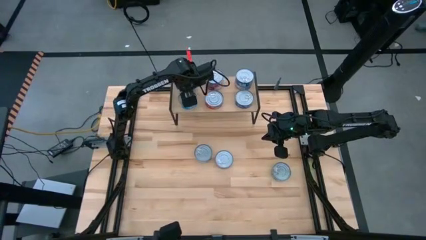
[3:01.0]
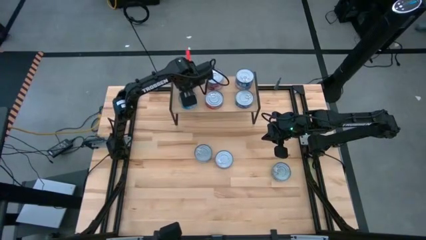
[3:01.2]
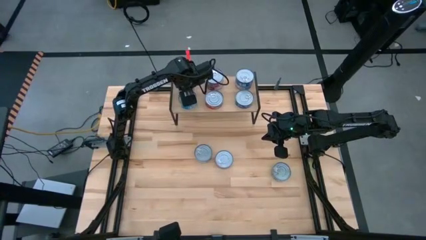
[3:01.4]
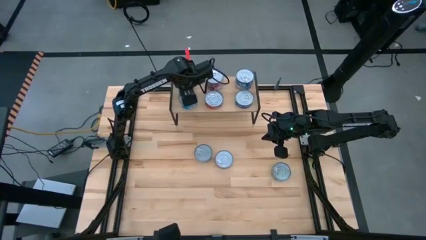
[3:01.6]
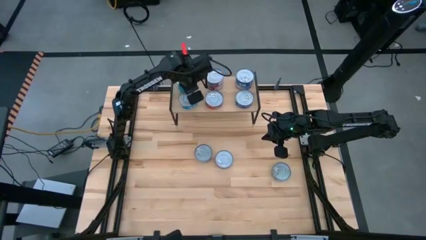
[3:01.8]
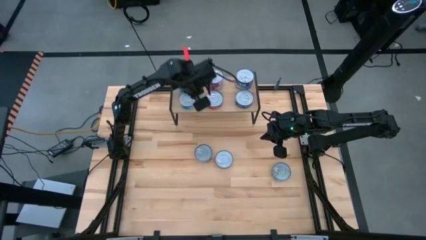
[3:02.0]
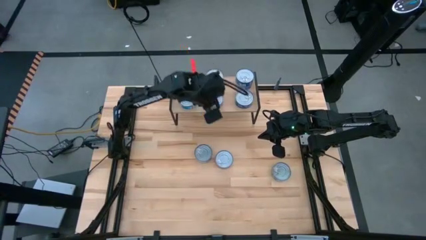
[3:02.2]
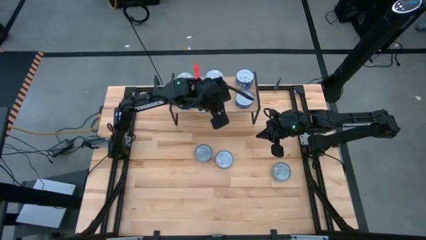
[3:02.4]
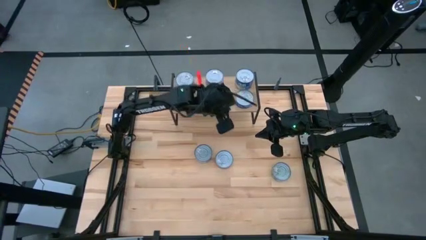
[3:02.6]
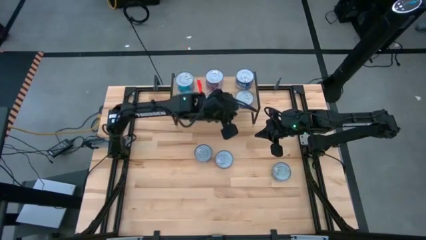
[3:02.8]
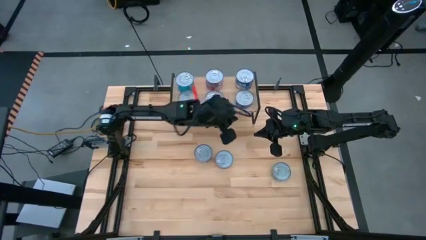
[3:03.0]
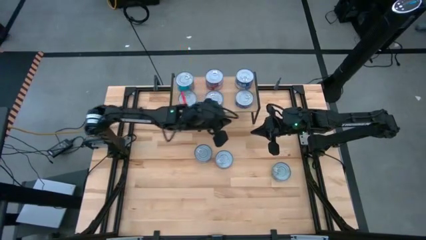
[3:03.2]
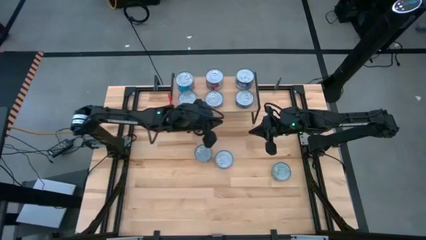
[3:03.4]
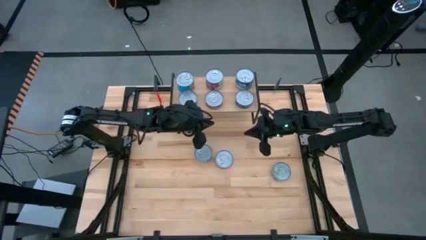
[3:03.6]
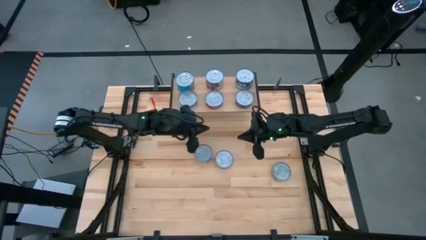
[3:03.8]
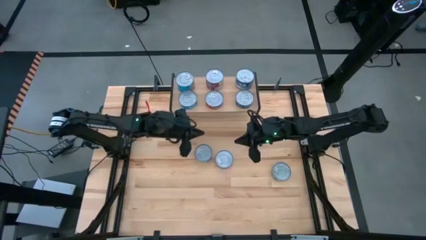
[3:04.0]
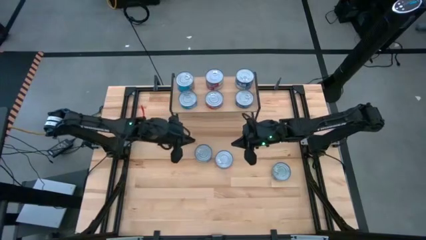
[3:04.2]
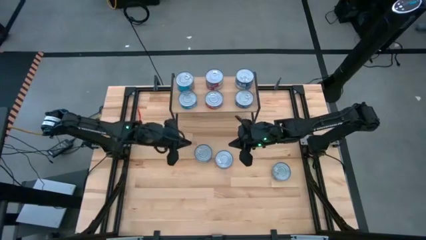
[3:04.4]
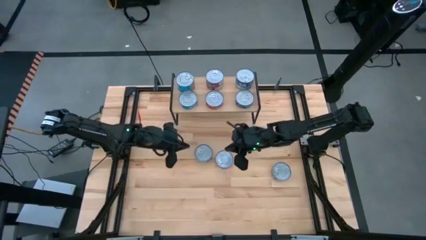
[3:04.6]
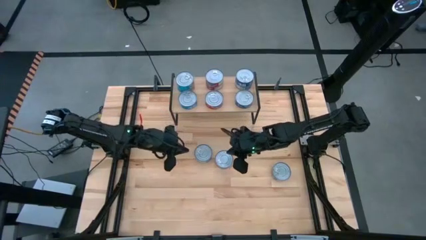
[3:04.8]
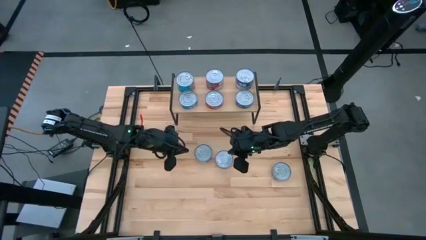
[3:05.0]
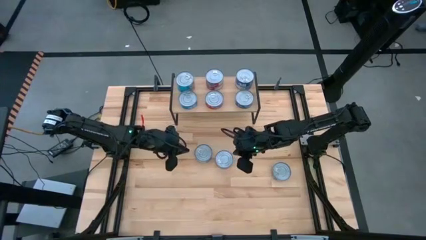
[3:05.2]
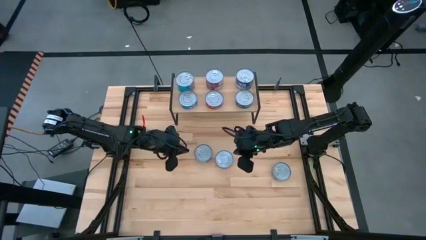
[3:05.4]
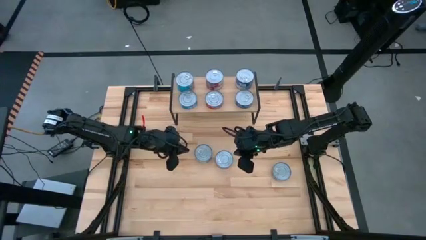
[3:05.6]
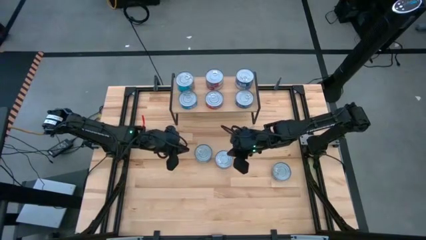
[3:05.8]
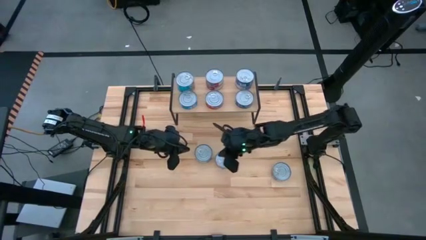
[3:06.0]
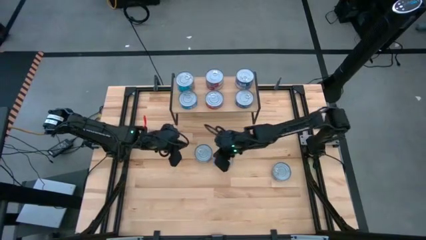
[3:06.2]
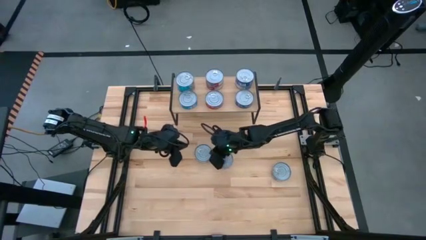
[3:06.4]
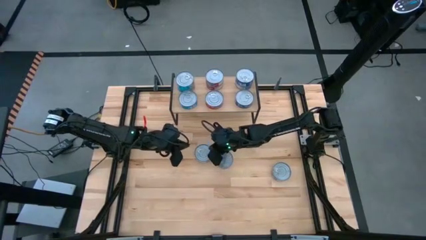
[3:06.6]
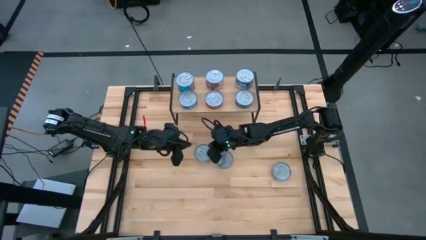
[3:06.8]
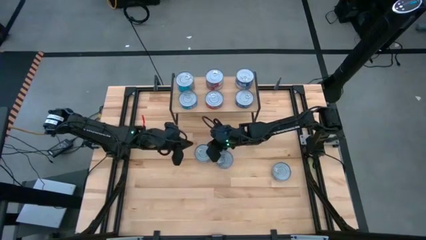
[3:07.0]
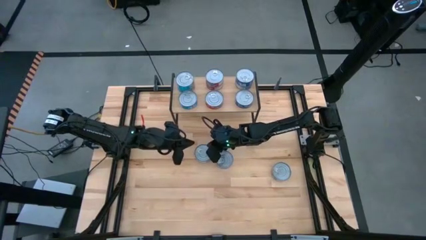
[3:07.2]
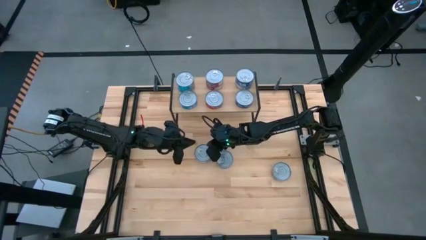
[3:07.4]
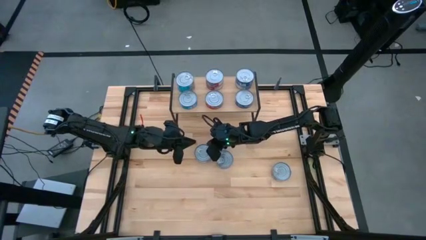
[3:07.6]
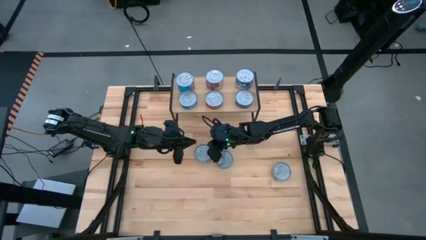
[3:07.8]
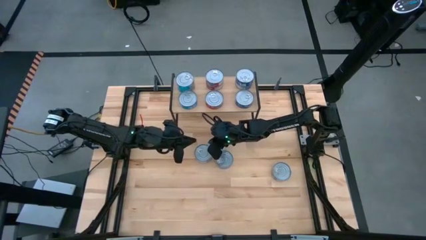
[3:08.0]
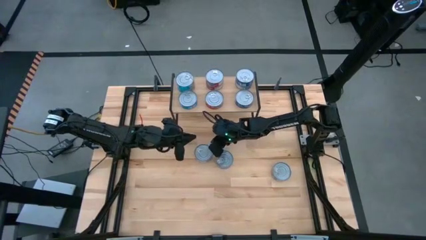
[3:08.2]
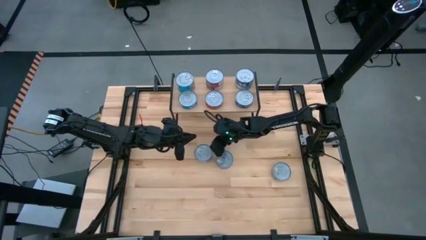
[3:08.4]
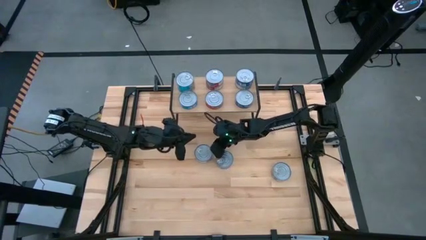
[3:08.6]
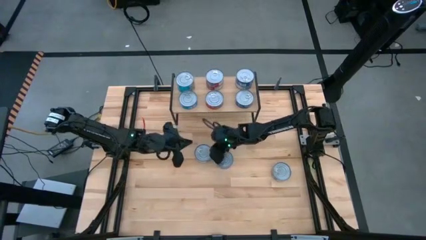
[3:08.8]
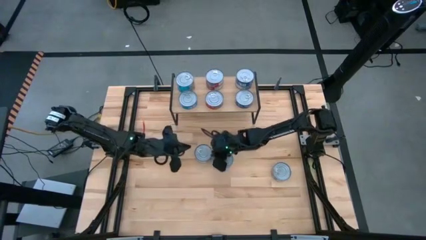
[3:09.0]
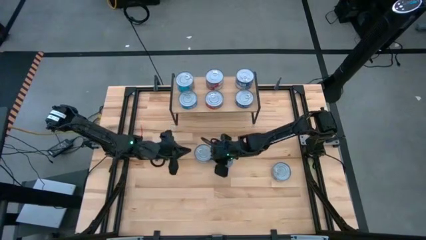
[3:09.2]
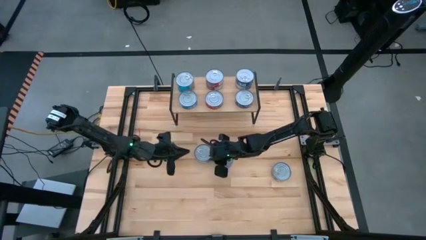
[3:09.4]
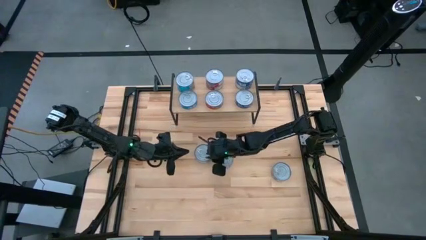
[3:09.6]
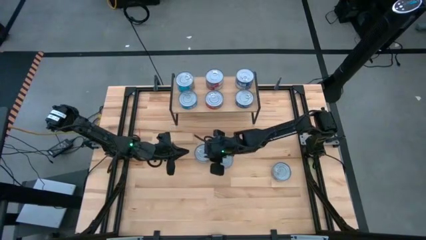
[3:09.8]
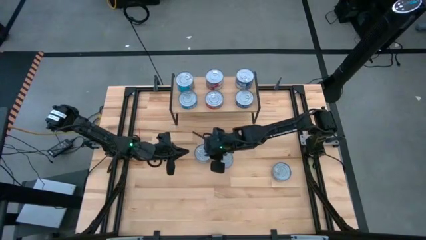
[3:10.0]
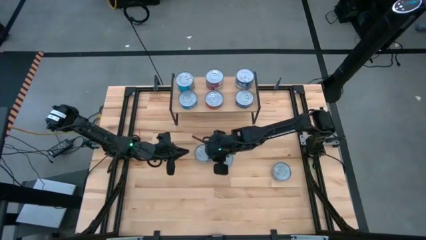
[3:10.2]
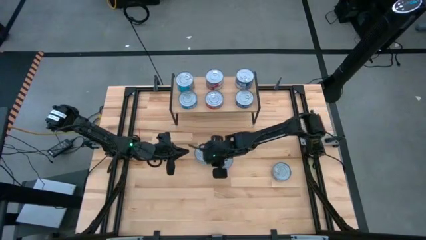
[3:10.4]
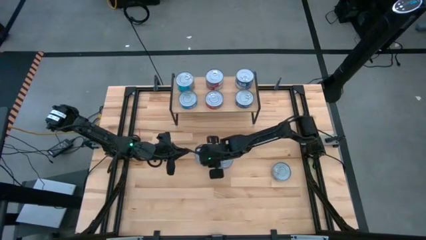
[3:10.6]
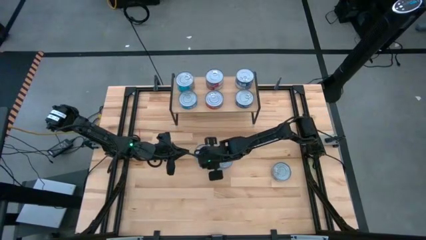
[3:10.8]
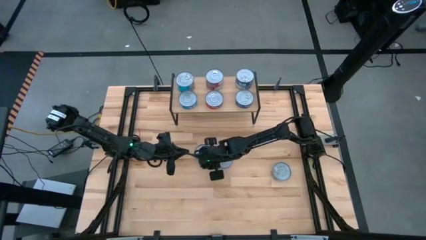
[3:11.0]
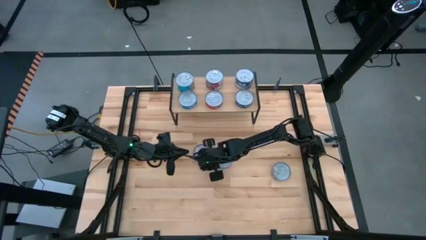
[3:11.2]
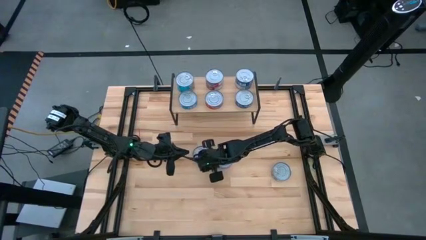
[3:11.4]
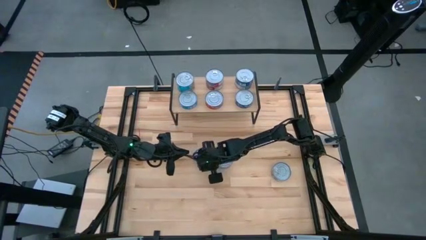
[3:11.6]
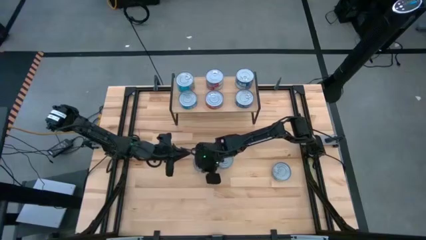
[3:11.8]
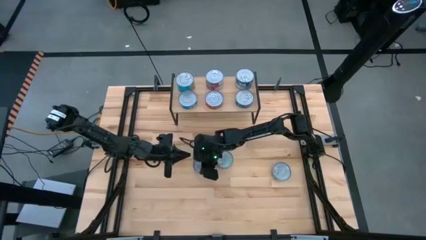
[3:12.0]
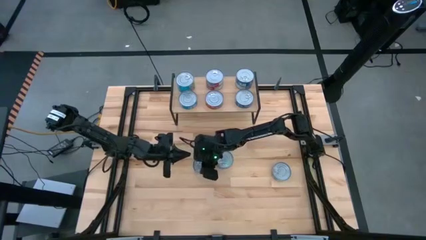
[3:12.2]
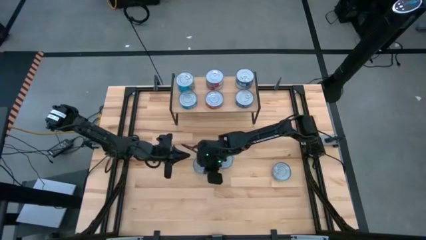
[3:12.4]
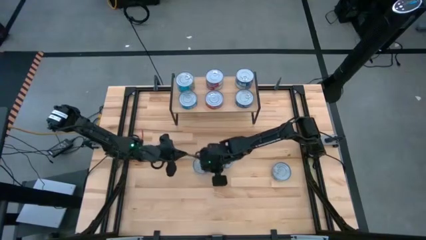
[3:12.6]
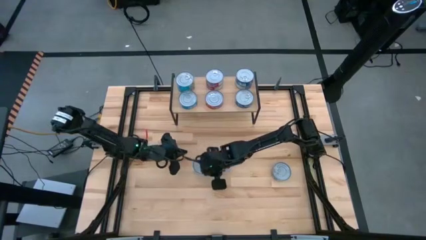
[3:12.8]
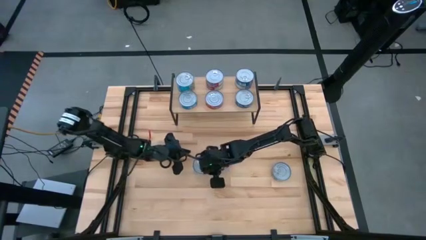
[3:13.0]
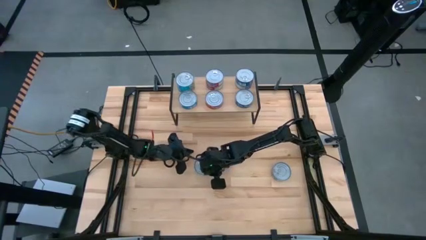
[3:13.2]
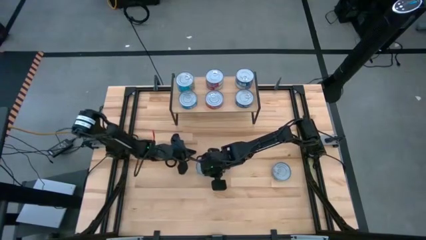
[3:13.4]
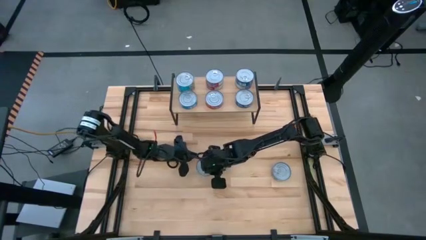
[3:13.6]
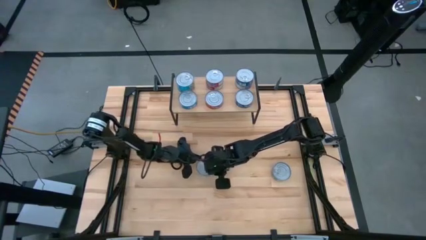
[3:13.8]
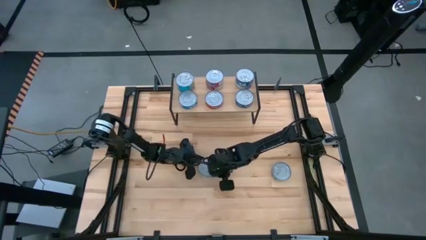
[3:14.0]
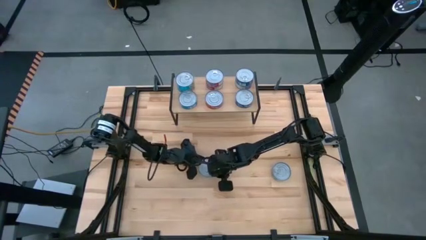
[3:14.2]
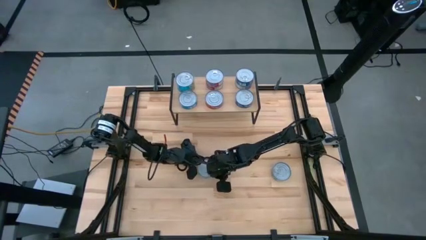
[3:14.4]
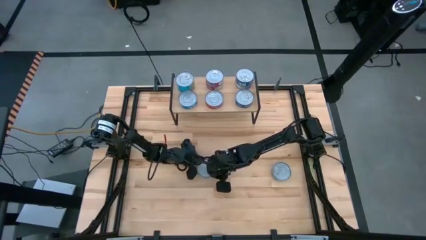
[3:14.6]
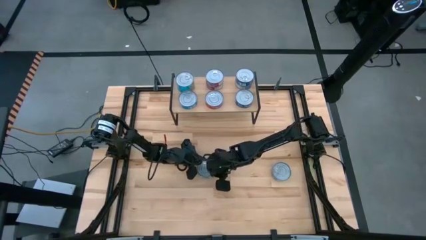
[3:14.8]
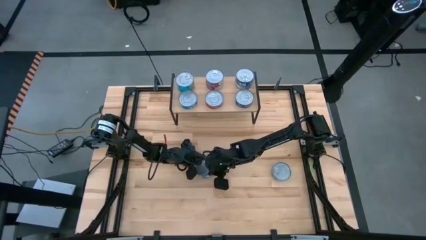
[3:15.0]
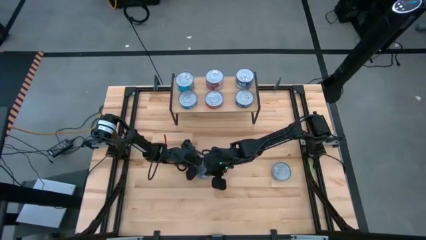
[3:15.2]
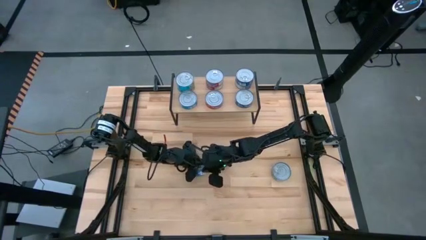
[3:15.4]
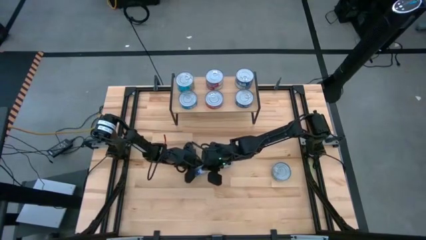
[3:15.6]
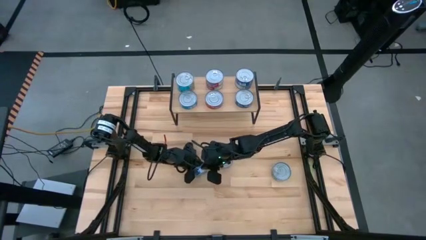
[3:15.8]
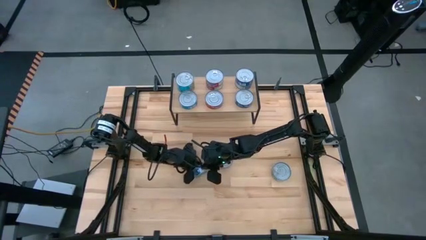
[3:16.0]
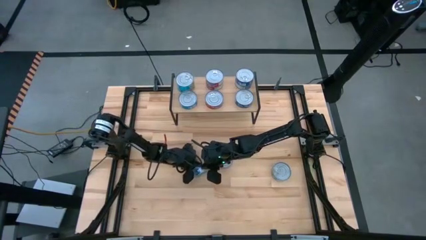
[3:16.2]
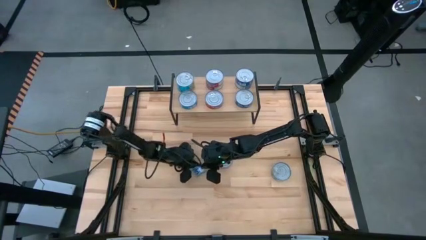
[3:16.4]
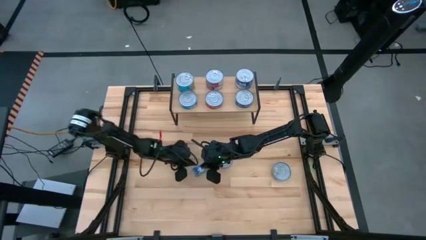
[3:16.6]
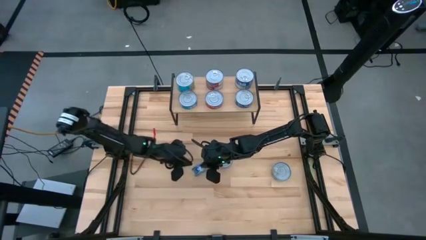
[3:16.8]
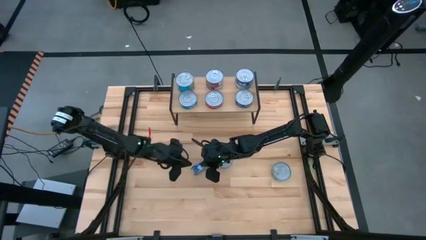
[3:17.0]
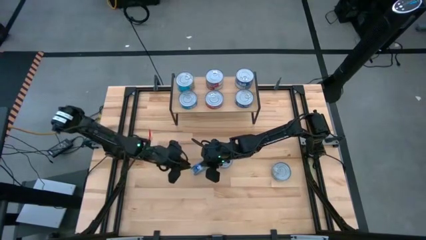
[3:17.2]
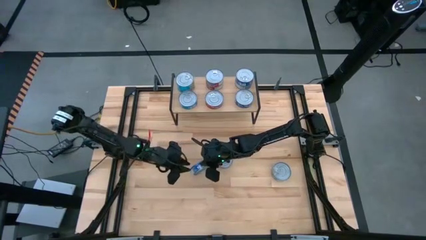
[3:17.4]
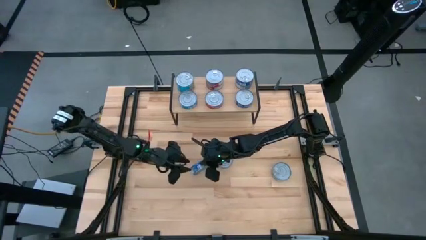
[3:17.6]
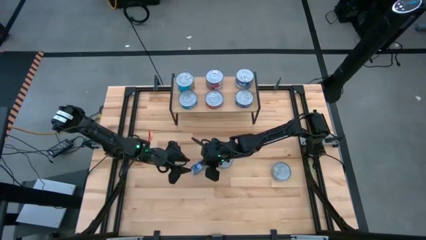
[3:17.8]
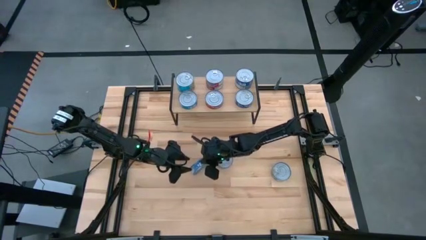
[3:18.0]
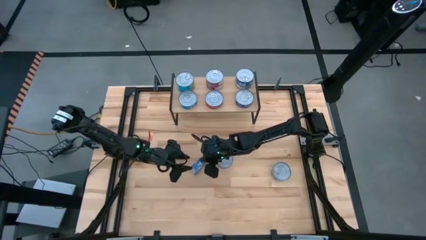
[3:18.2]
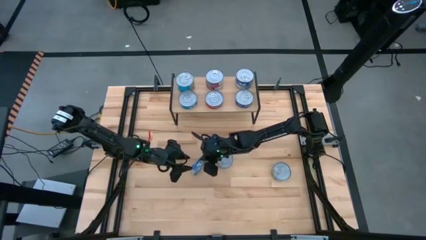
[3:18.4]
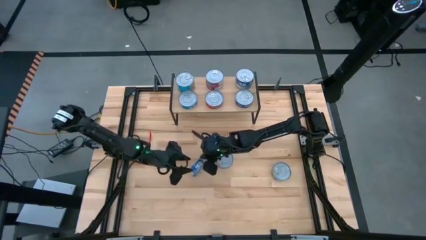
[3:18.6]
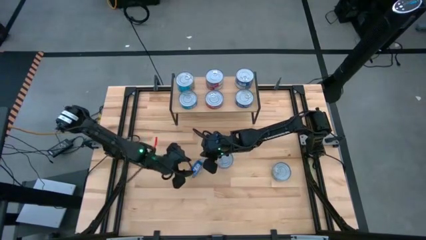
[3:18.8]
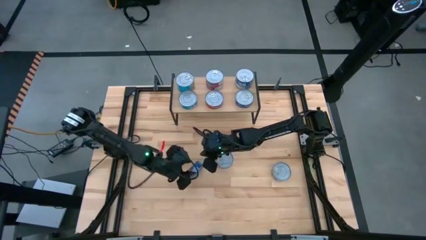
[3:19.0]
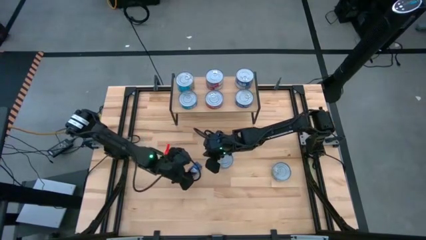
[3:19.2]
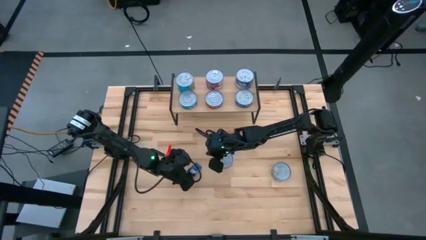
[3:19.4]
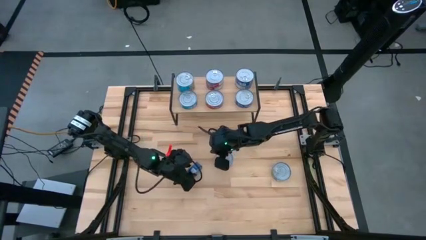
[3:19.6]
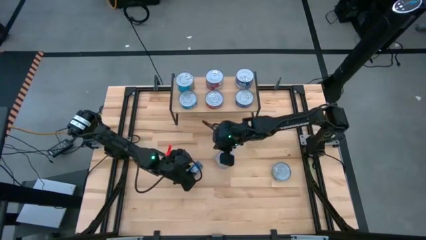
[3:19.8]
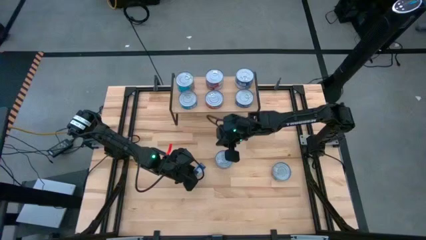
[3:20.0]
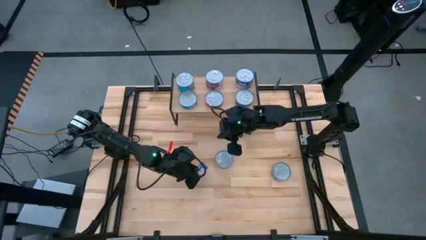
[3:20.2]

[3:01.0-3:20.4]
Task: Stack canned seafood by type on shelf
Stack the blue tuna can on top of the other blue tuna can on the shelf
